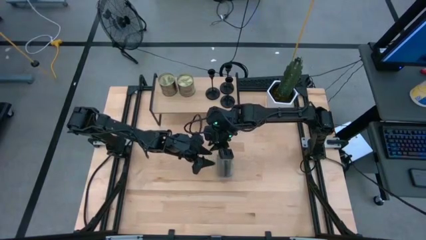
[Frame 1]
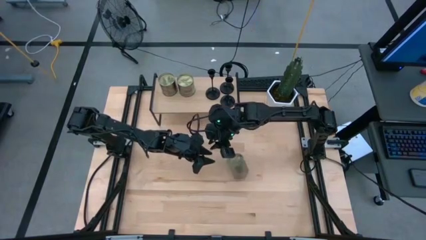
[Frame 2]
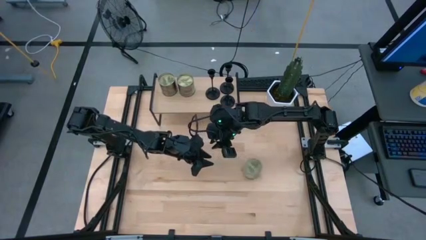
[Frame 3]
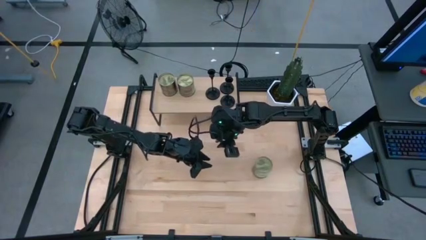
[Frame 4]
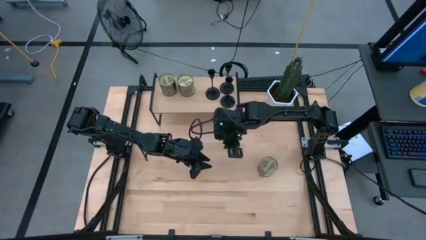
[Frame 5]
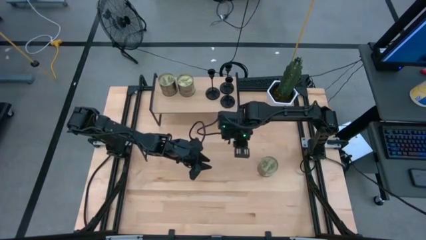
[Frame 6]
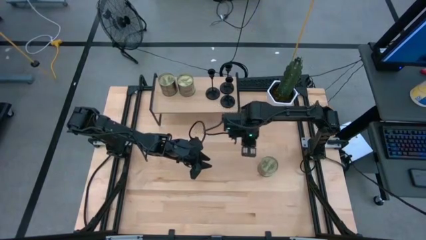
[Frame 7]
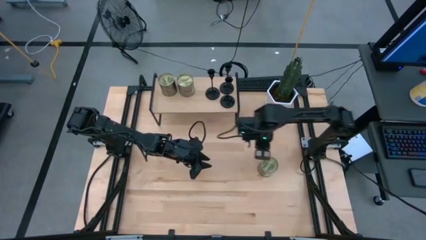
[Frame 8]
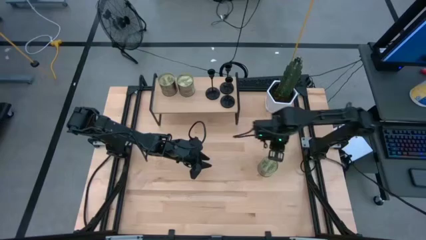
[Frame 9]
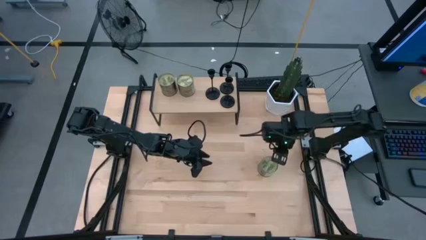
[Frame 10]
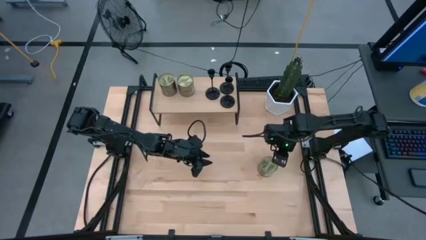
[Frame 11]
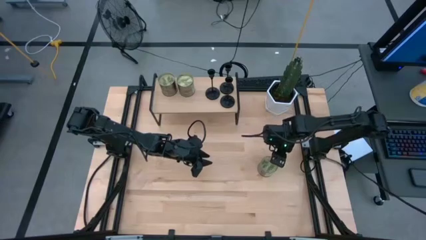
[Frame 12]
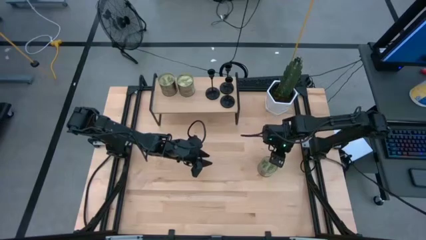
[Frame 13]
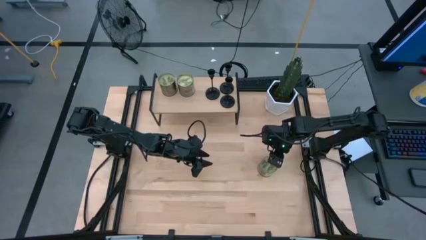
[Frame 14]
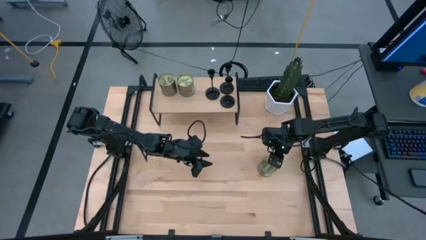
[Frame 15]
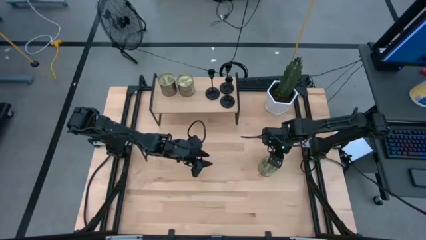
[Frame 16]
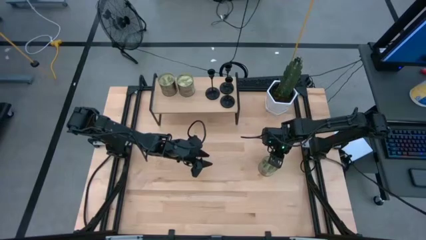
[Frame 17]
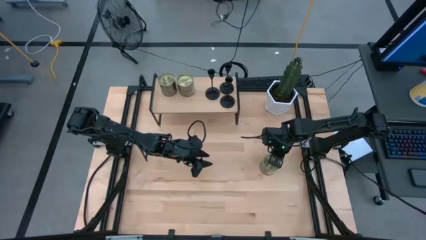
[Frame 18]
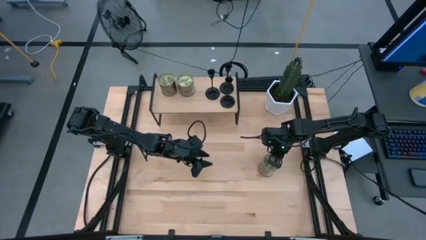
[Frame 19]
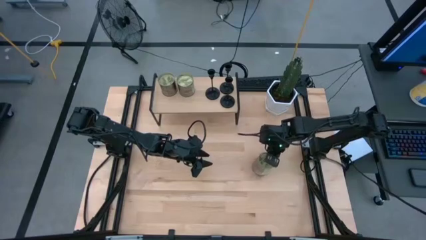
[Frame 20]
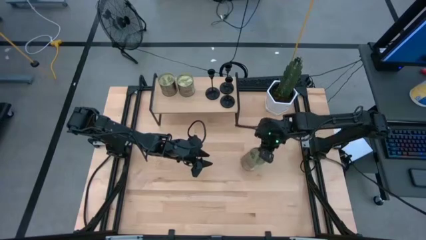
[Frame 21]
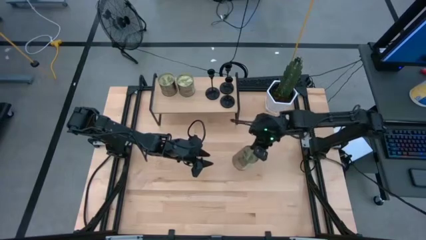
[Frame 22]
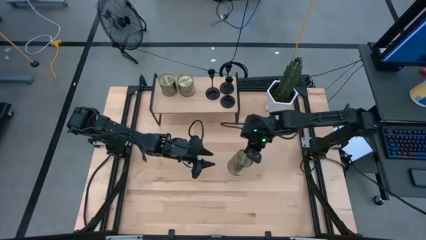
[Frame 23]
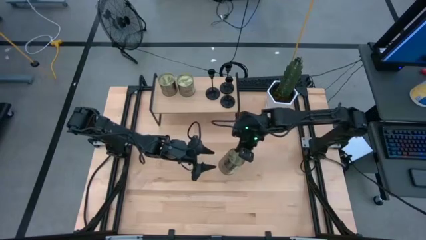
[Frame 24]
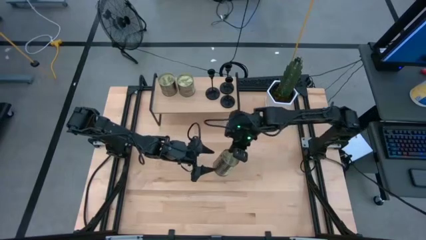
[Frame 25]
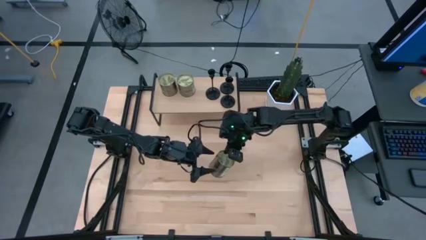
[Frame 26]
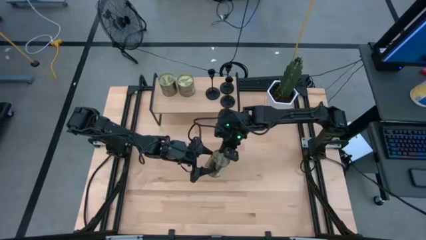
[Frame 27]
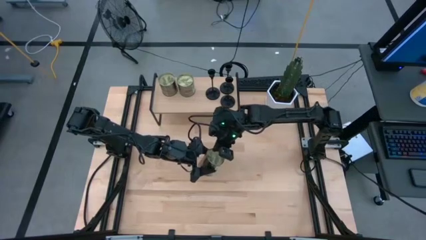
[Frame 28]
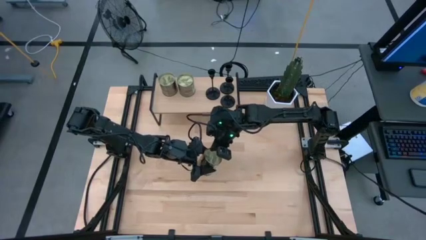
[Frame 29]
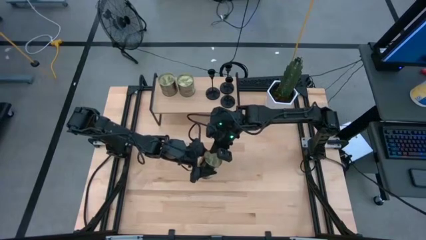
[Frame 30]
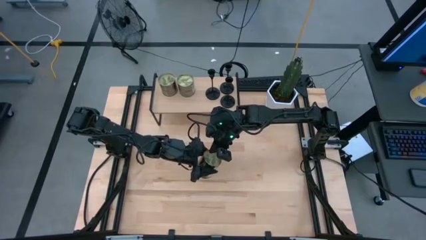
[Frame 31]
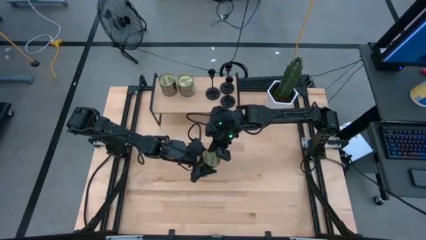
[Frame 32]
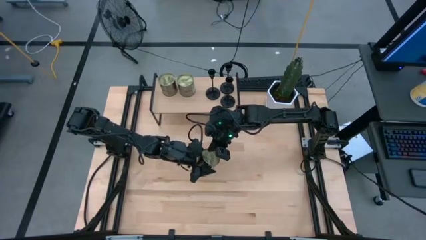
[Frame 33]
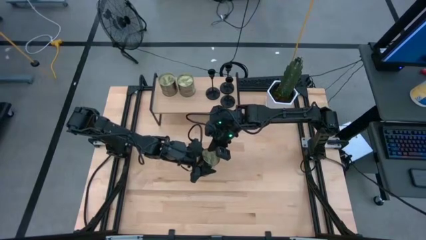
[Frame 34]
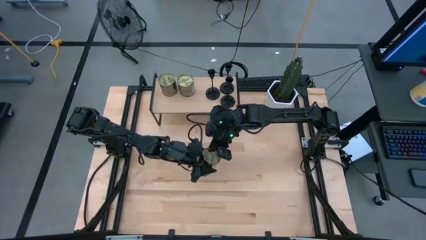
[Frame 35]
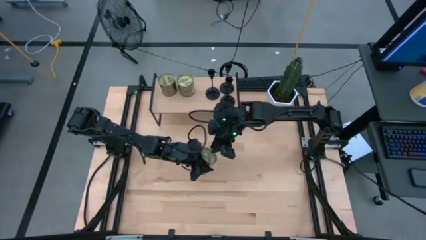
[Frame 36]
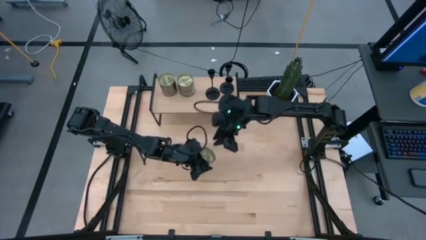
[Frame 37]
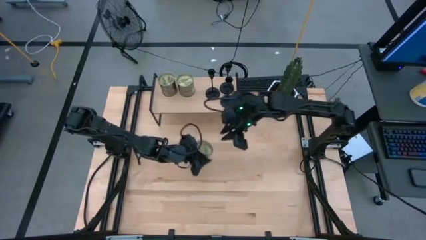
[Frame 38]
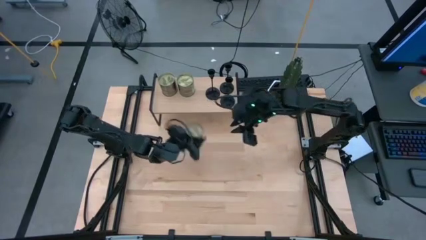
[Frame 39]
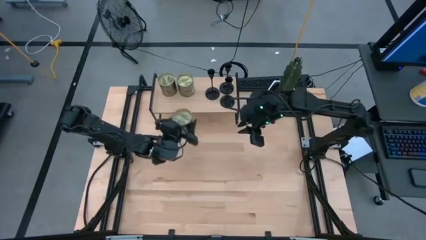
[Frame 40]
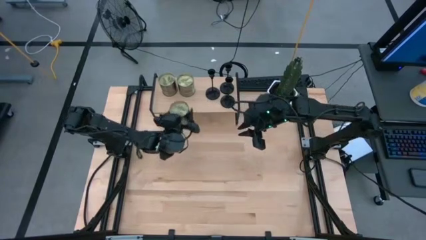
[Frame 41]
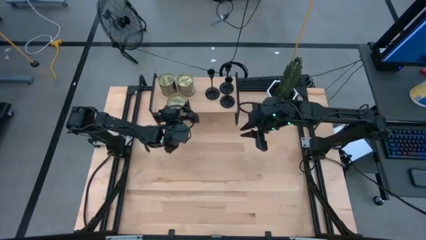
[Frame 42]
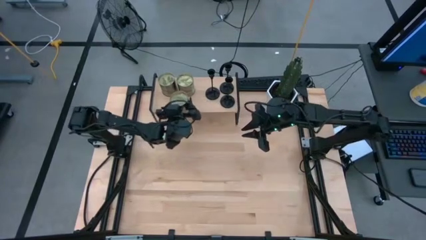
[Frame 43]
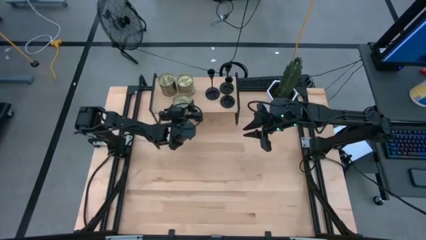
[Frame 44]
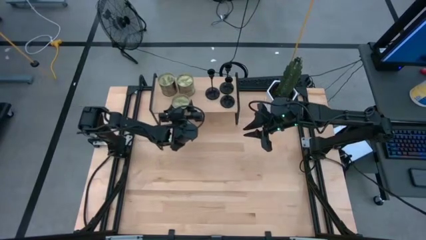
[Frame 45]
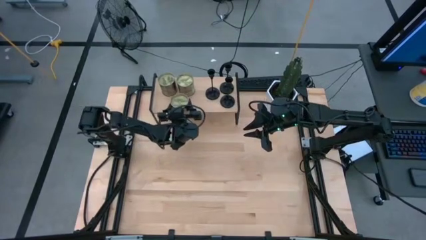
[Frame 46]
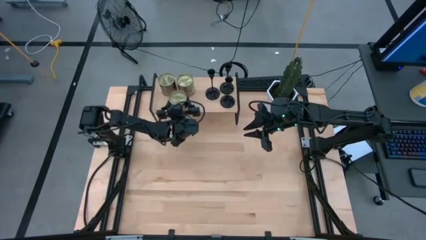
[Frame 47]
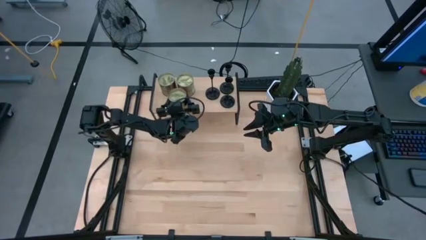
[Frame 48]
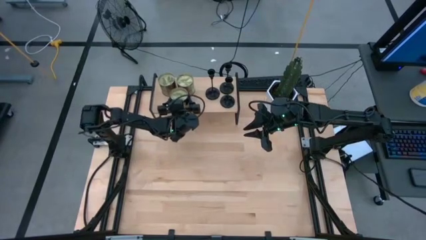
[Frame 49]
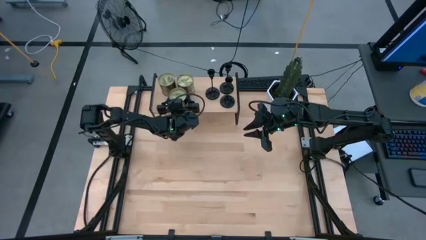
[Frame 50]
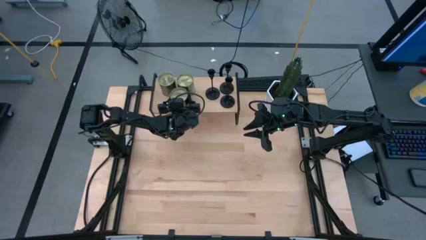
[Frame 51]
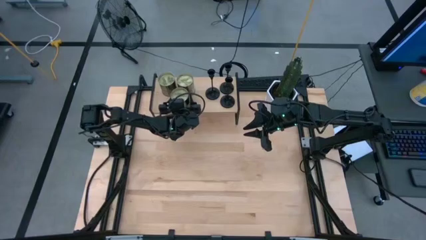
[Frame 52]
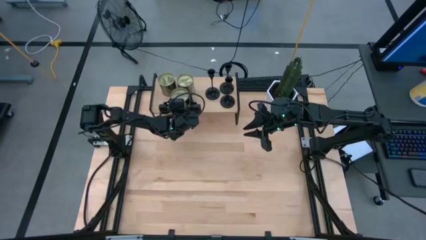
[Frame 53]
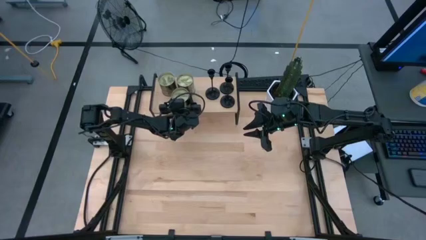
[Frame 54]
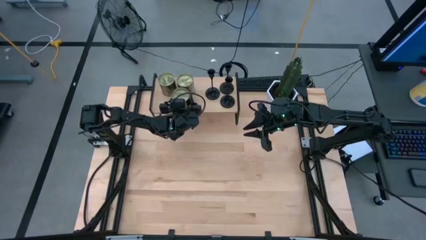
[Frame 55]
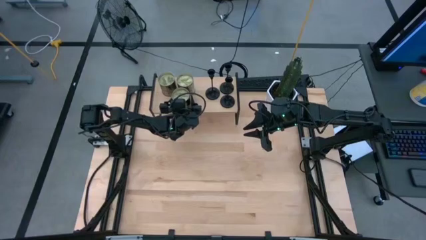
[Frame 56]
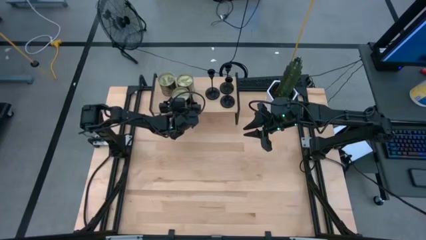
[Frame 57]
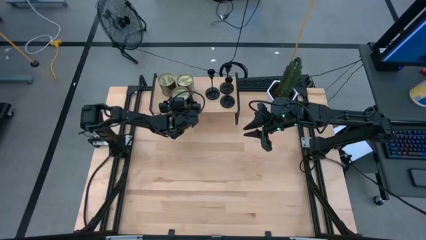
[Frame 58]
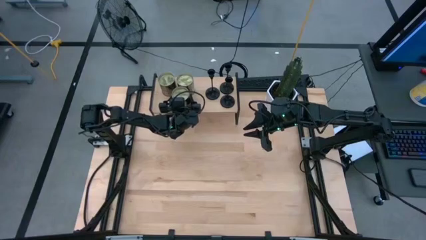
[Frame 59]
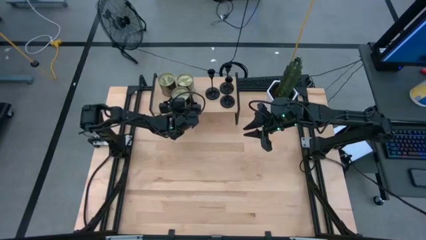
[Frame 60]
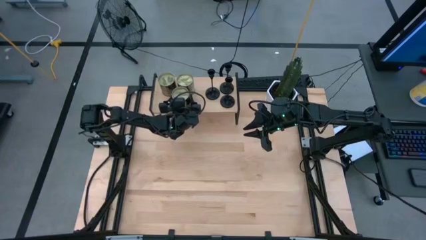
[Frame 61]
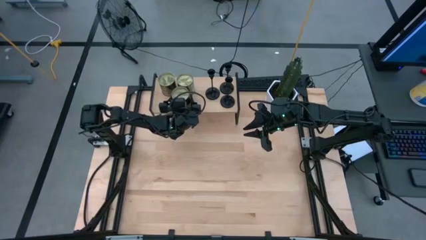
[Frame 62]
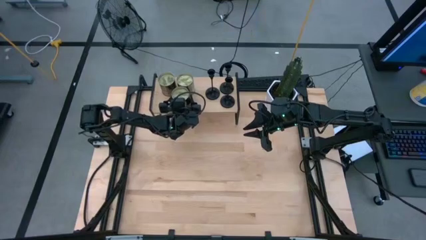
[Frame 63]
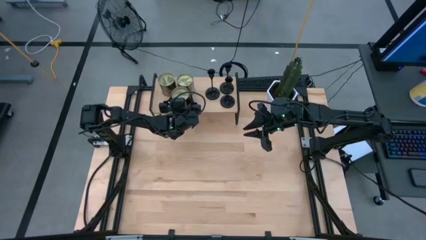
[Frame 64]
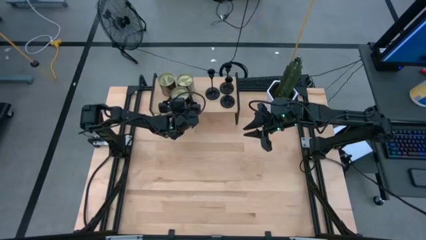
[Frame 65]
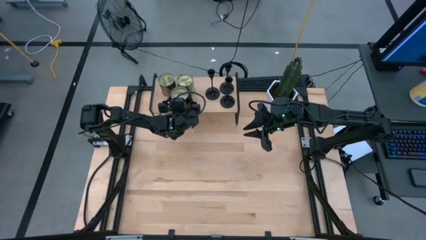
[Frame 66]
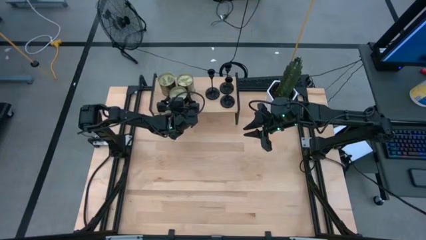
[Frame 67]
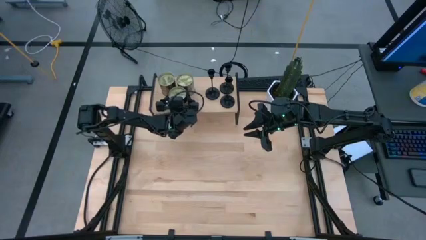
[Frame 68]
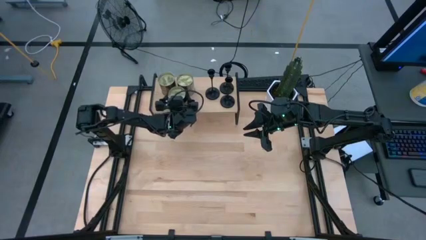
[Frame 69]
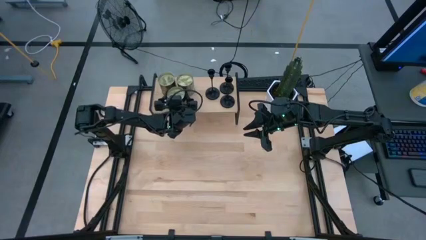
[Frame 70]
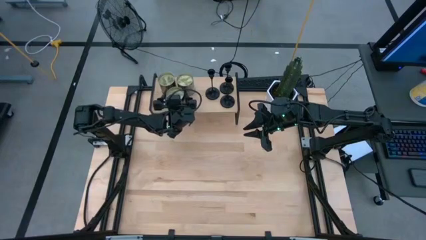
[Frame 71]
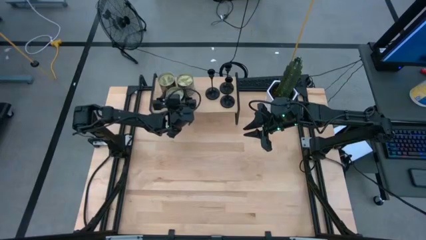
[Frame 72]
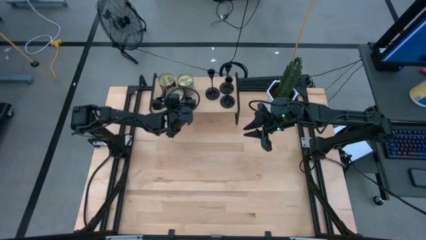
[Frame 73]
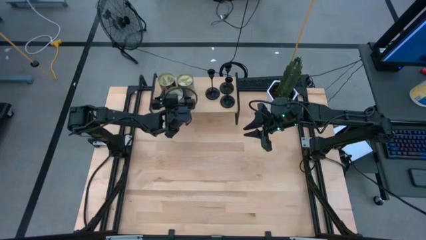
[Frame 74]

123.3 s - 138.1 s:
Task: Pick & Place candle stick holders
Put the silver scented candle on the shelf

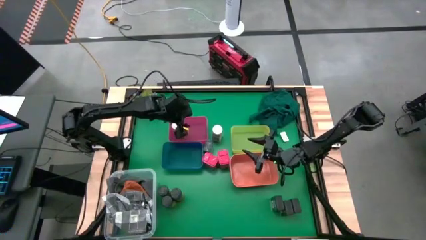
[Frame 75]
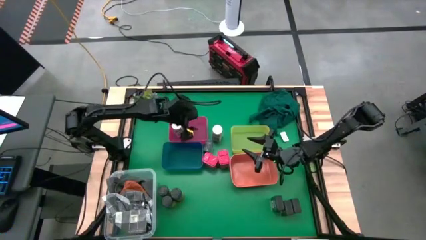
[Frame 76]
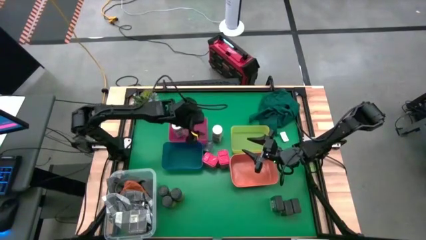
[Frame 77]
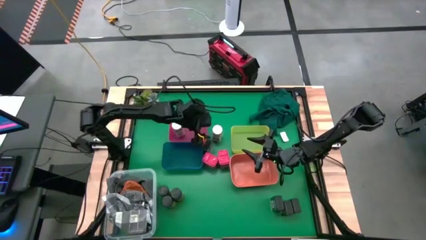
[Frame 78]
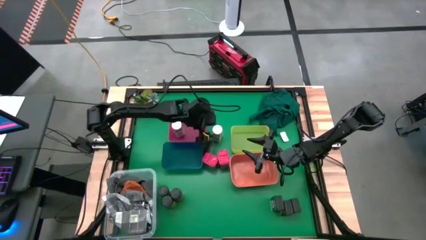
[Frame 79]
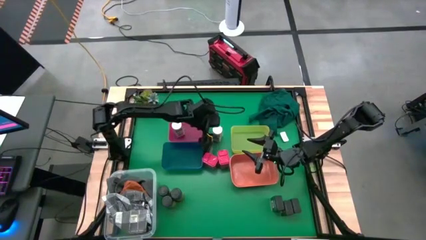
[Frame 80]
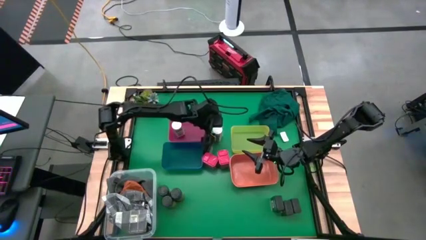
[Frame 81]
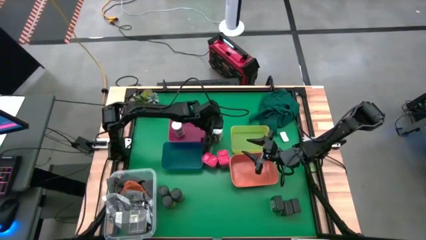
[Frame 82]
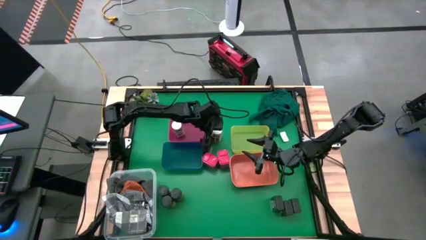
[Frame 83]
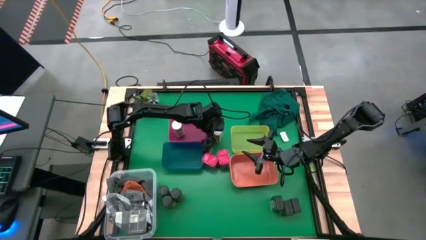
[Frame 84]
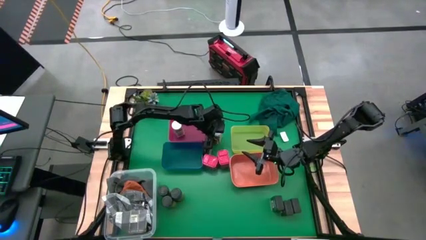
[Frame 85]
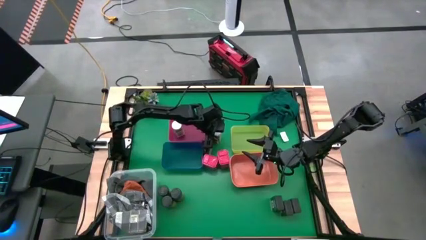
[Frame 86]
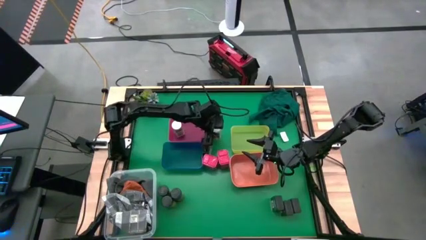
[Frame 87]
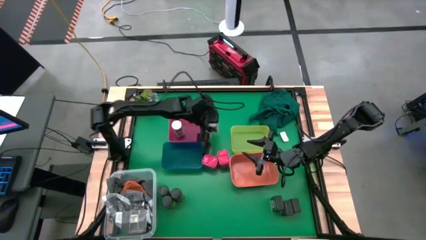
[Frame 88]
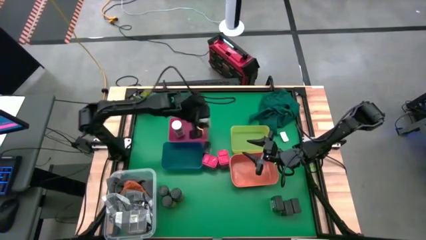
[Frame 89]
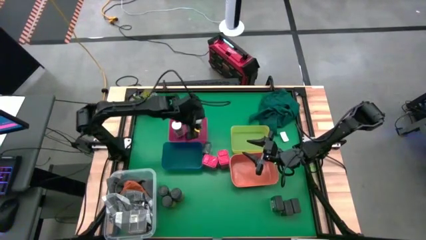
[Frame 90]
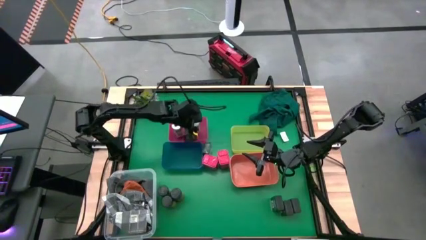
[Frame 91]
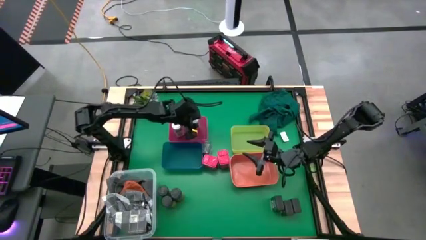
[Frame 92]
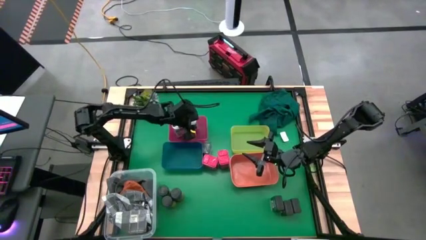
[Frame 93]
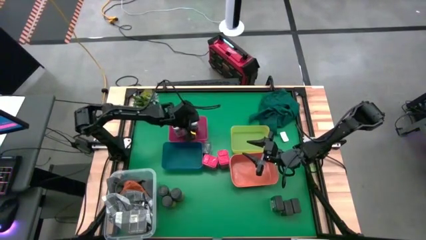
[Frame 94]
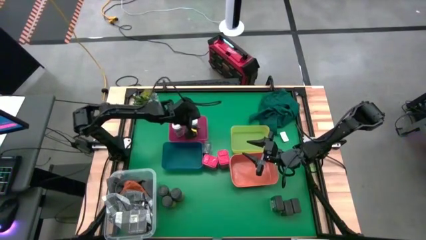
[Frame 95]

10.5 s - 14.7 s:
Task: Sort spices by type
Put the white seasoning bottle into the pink bin
